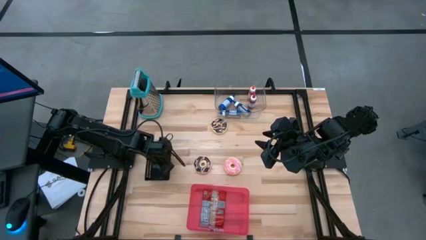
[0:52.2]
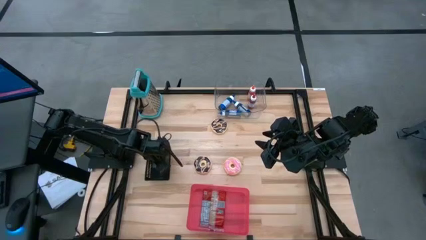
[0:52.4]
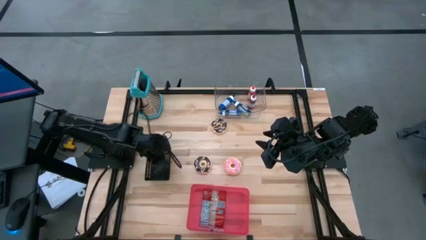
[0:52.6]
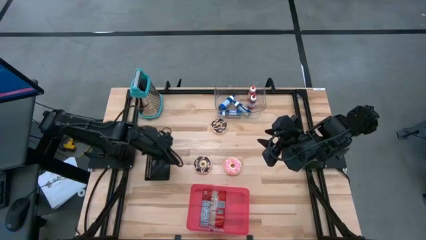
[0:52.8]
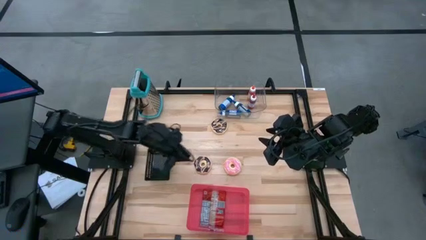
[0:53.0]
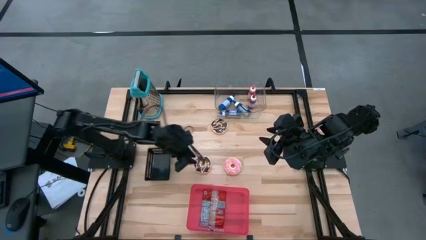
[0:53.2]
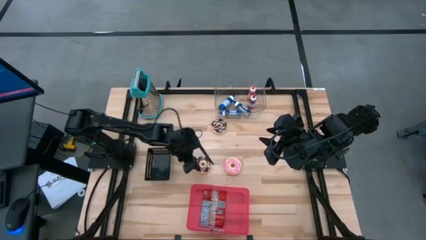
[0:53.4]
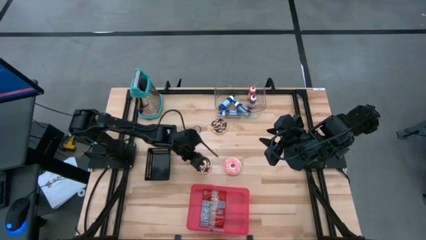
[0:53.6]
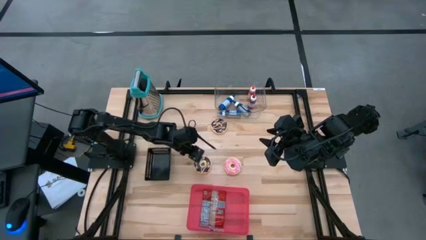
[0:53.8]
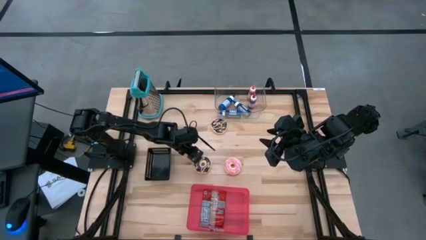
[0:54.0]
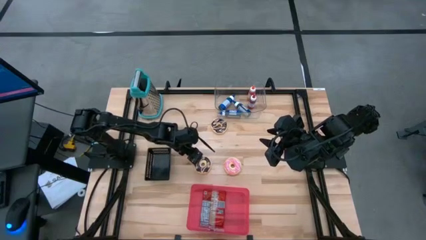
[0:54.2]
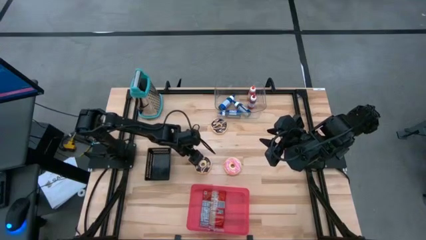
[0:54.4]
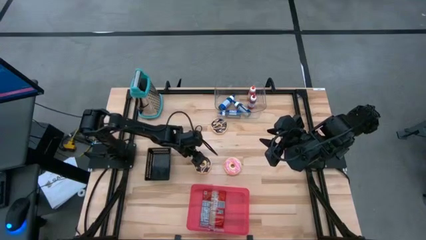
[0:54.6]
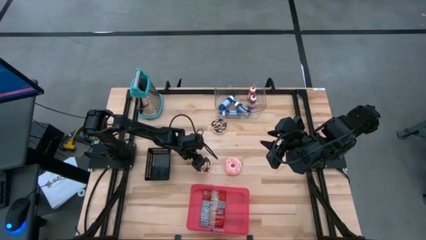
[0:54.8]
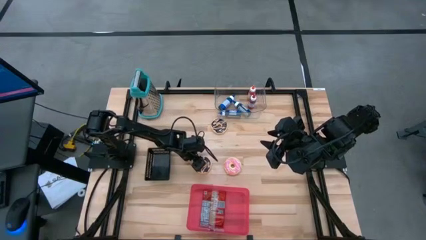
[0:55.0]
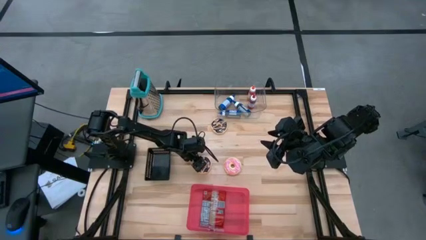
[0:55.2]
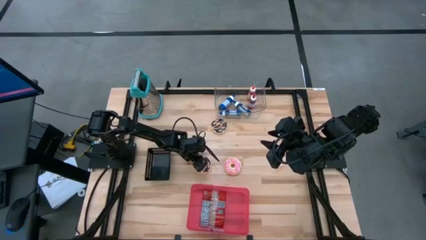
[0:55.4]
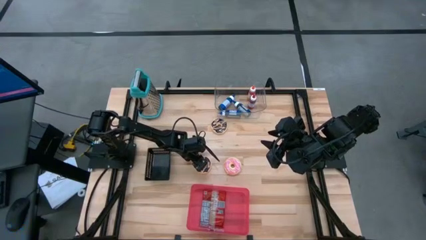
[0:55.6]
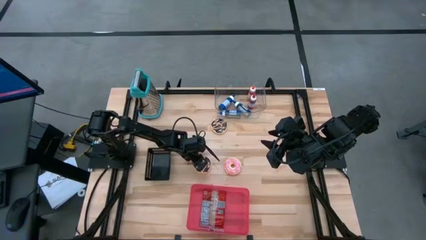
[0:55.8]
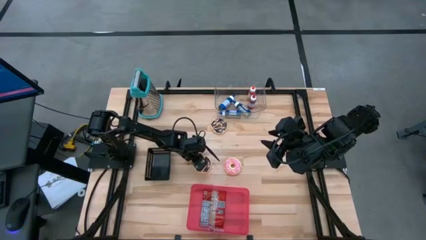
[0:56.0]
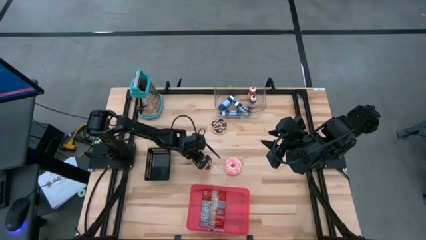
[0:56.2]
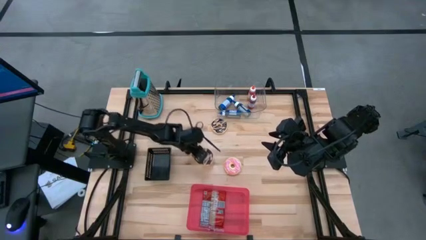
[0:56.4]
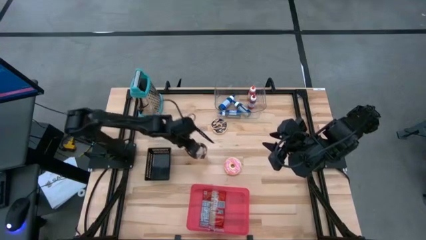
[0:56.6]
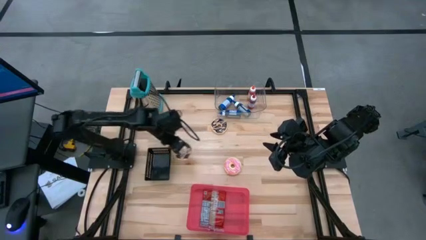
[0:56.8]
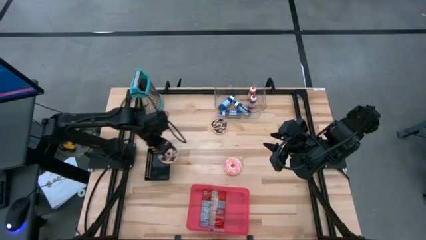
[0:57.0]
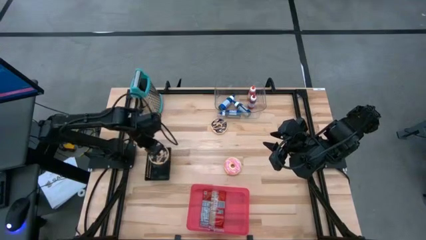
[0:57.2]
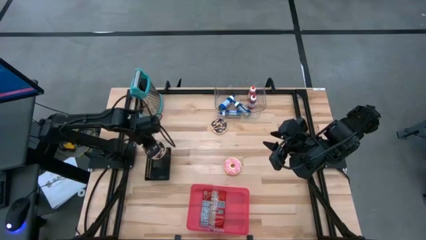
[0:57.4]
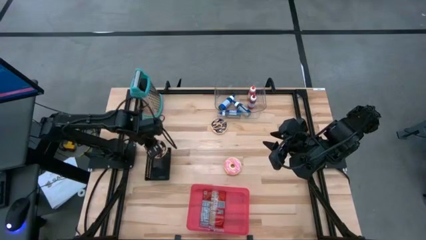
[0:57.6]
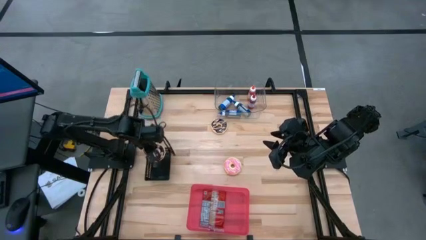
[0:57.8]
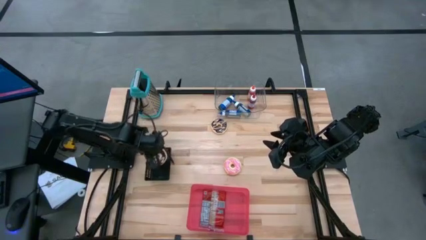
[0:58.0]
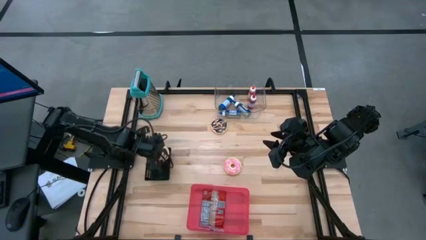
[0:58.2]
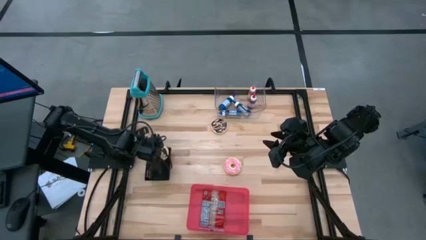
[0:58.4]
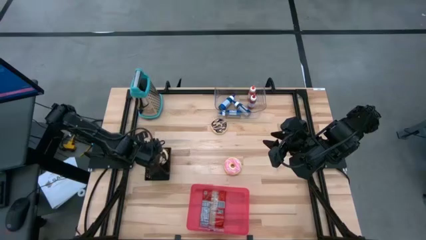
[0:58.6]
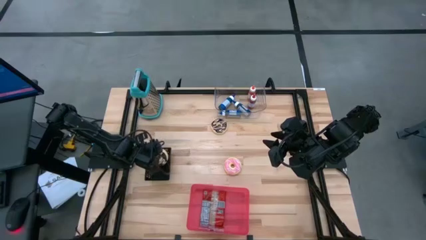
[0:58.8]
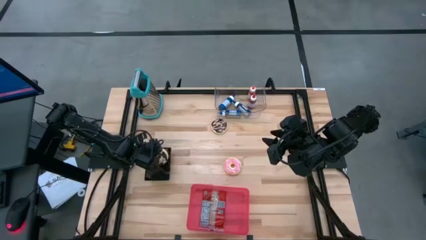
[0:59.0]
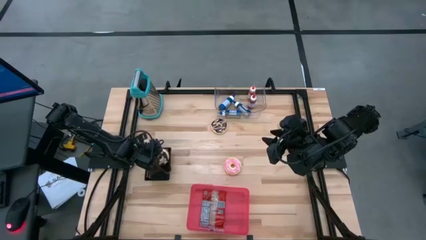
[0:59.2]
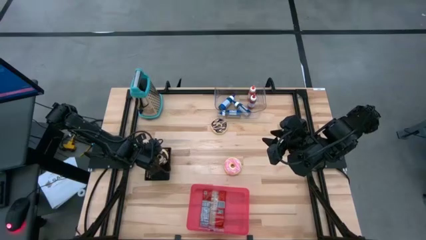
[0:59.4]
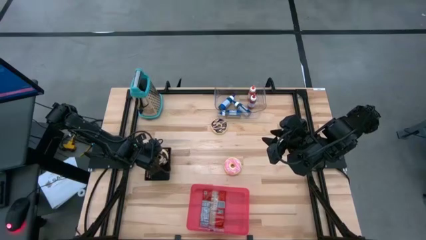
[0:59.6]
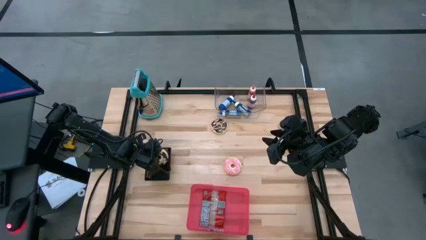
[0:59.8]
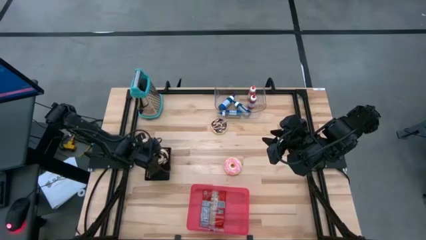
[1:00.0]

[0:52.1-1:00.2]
Put the bottom black donut into the black bin

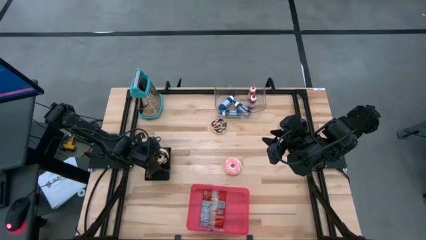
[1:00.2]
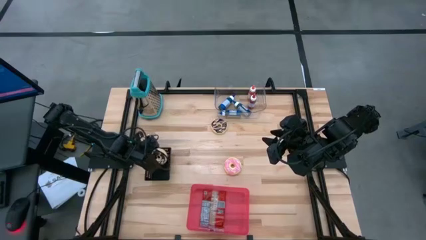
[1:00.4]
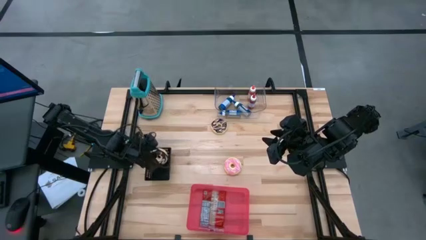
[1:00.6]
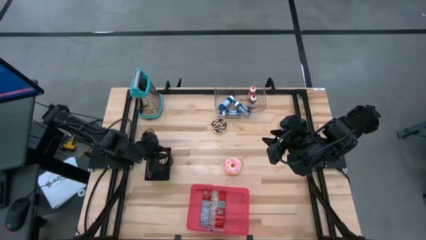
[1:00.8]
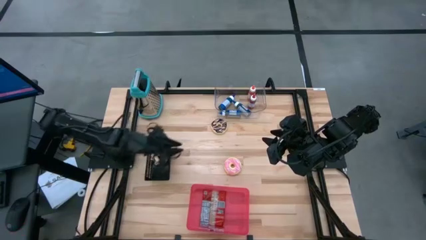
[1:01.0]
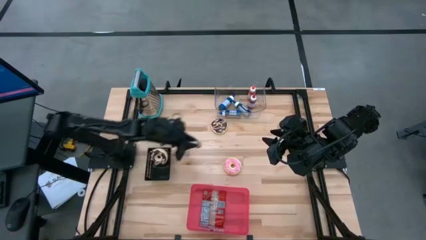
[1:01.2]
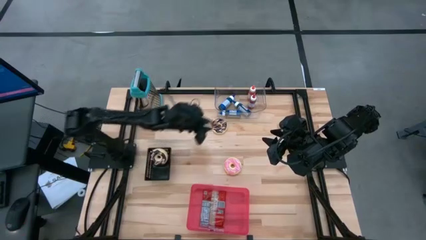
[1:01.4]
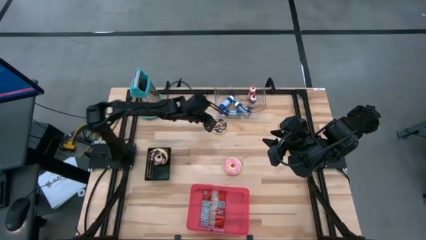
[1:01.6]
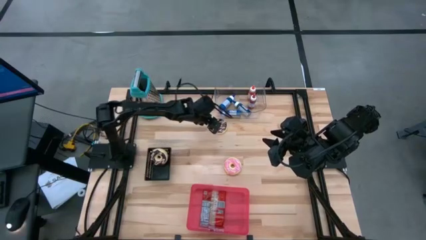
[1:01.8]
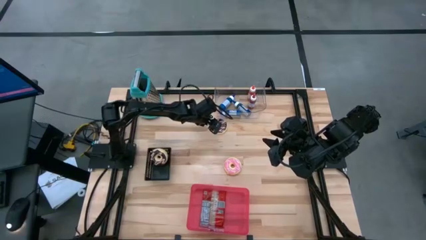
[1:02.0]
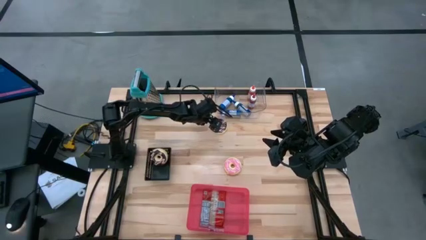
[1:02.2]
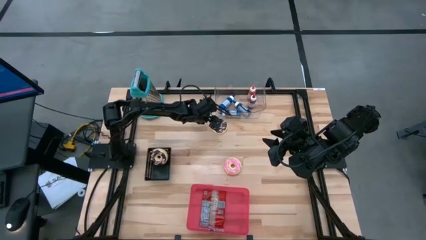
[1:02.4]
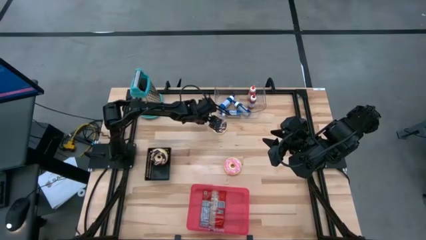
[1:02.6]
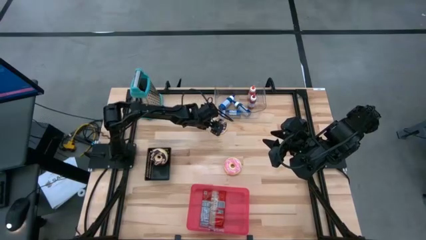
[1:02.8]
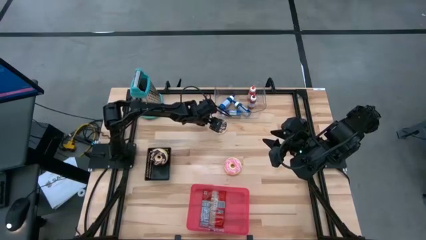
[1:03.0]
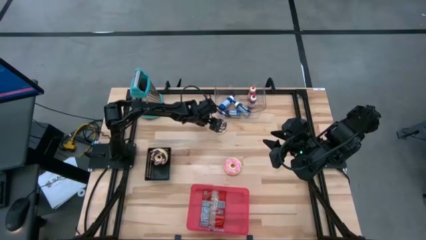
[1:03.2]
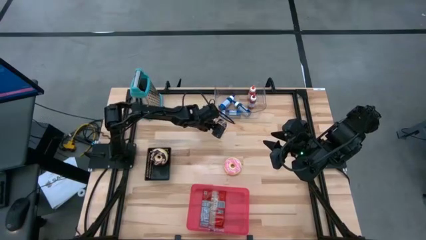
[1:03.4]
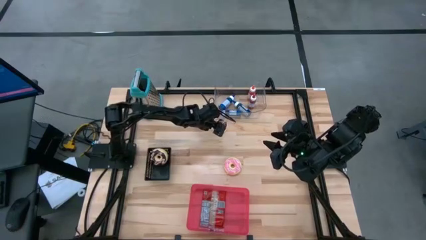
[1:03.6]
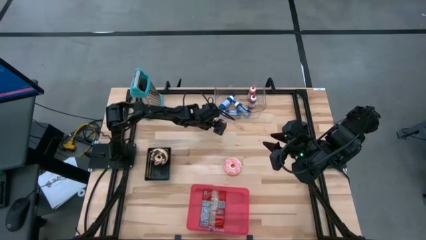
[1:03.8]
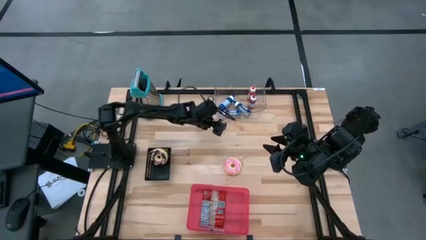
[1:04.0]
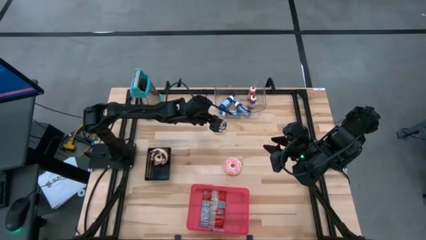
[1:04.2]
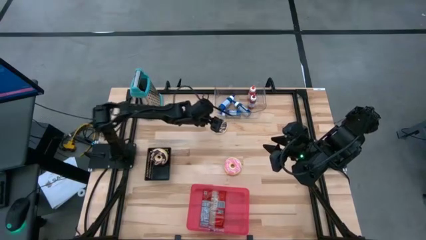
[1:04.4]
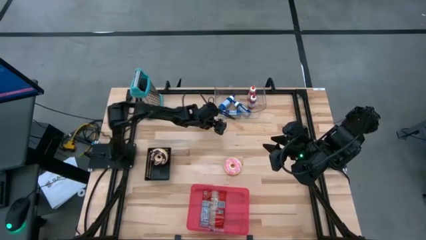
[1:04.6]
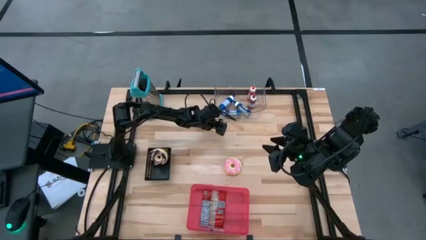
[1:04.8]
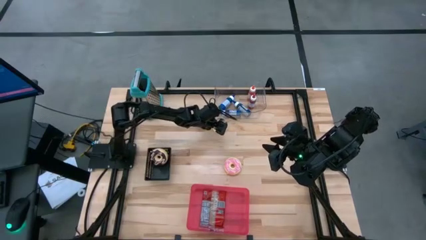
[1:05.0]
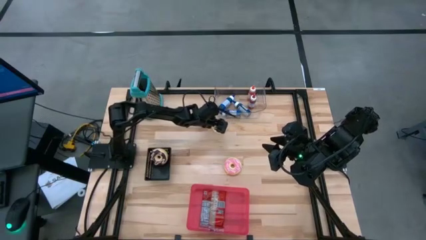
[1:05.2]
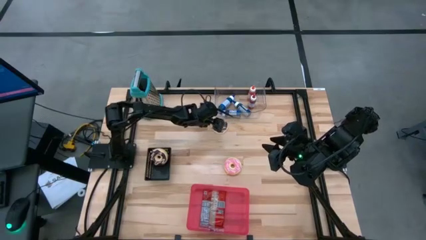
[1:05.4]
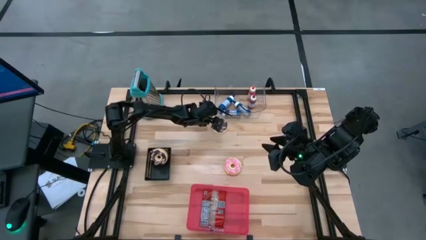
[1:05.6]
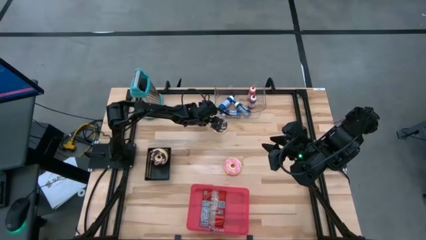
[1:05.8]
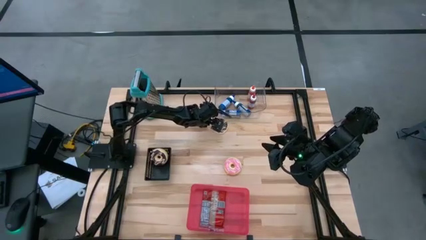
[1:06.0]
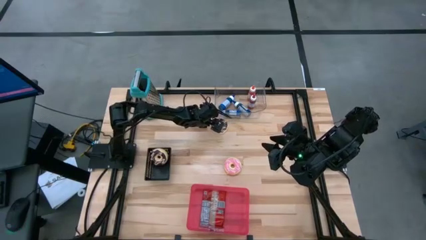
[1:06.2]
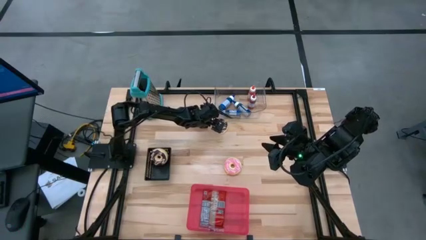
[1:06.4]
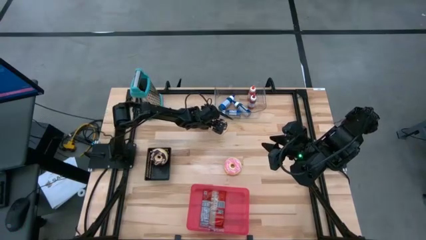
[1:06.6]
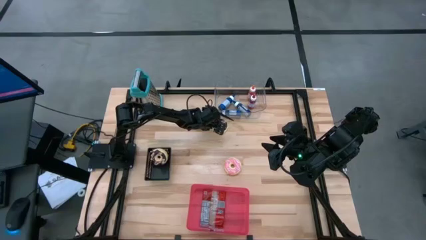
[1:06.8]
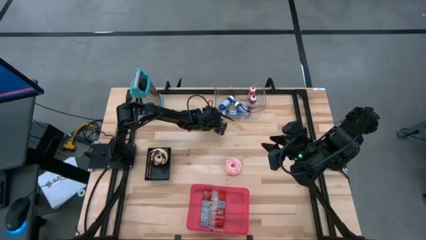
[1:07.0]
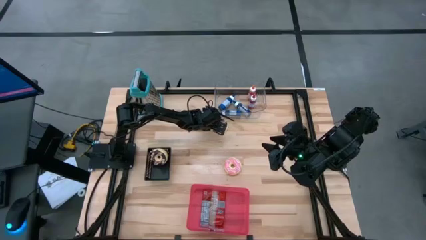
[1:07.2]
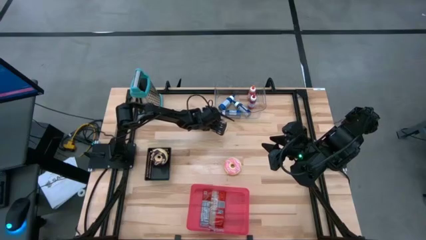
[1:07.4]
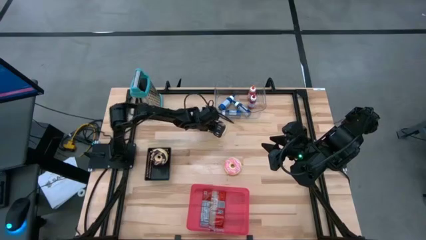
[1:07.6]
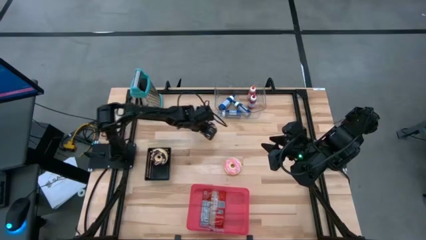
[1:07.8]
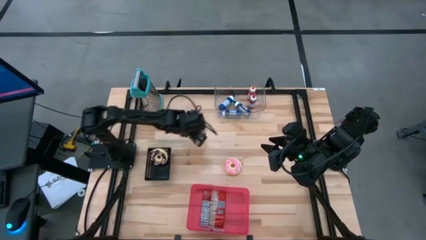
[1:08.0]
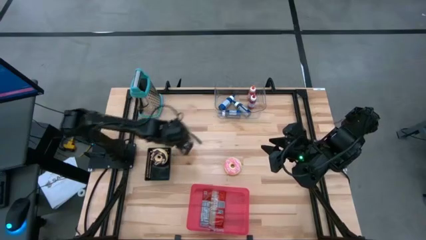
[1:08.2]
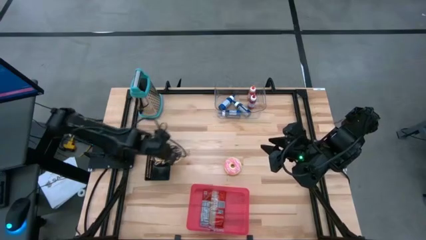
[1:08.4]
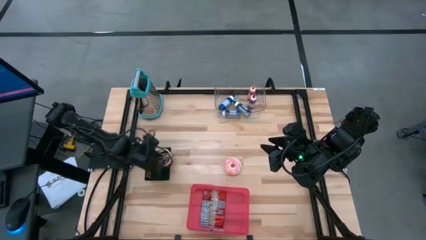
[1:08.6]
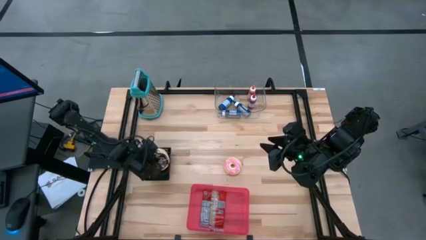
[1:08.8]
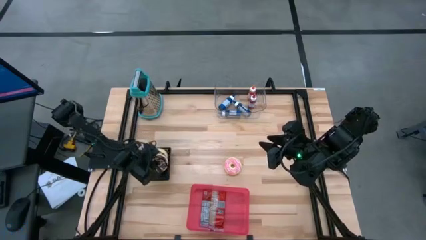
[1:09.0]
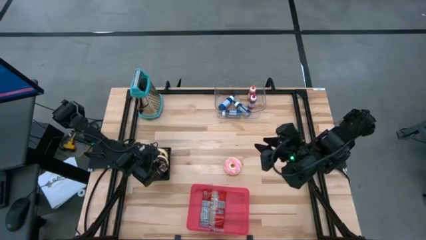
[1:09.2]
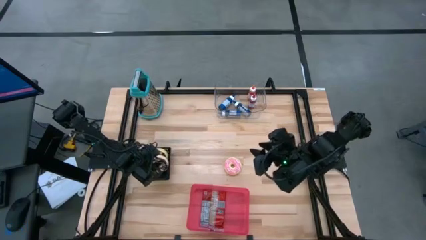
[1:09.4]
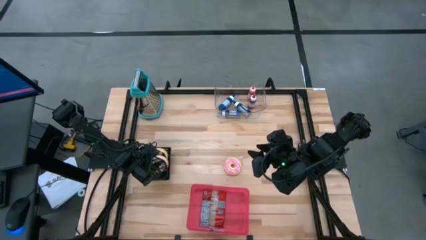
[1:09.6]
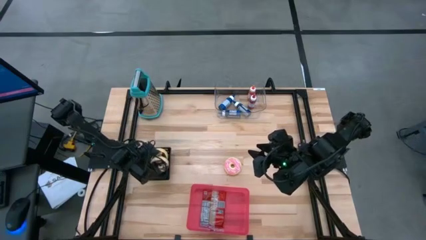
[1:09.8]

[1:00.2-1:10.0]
Put the black donut into the black bin
